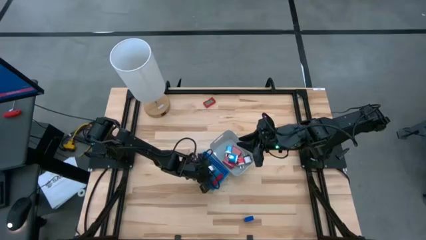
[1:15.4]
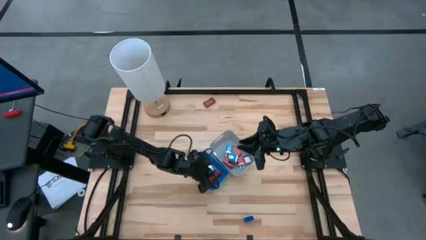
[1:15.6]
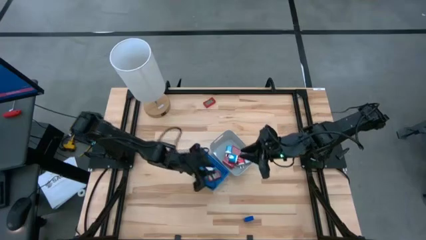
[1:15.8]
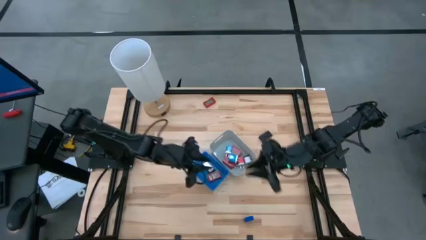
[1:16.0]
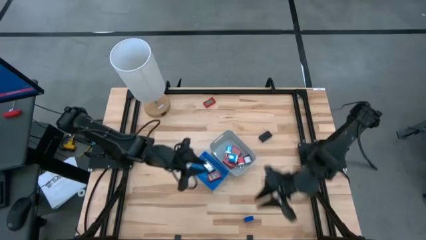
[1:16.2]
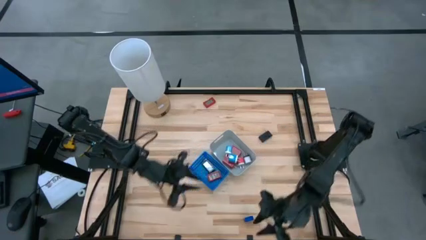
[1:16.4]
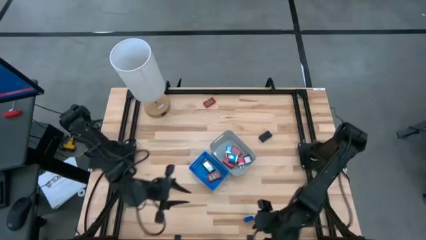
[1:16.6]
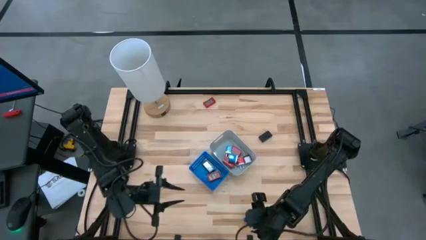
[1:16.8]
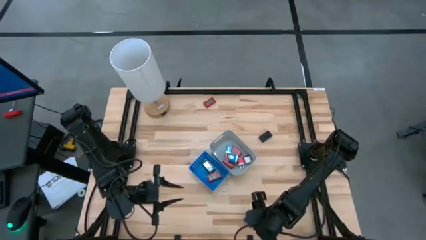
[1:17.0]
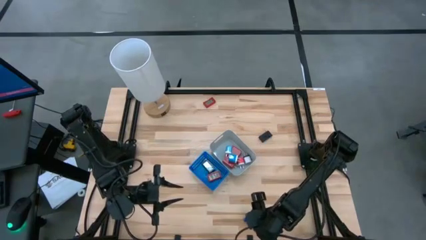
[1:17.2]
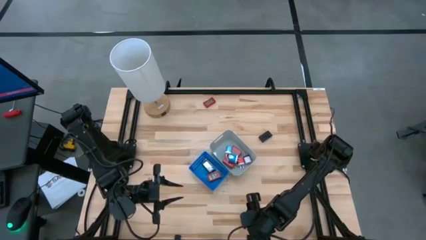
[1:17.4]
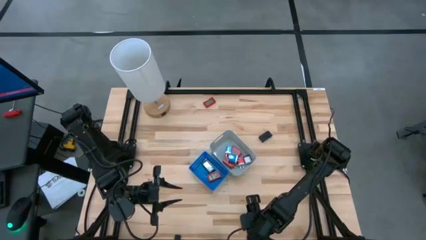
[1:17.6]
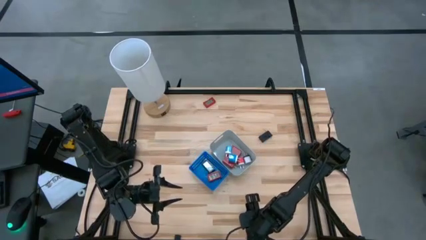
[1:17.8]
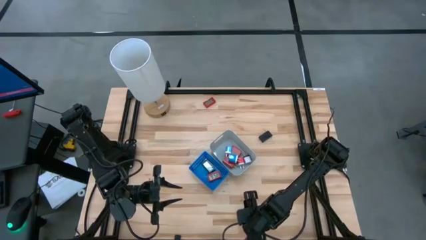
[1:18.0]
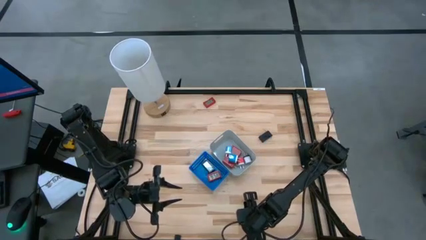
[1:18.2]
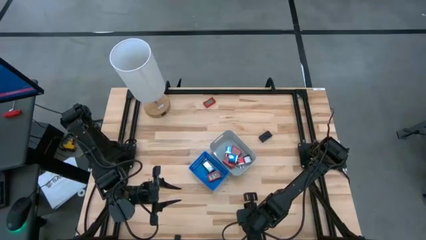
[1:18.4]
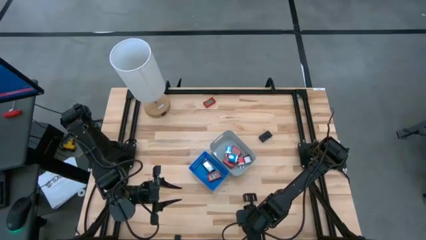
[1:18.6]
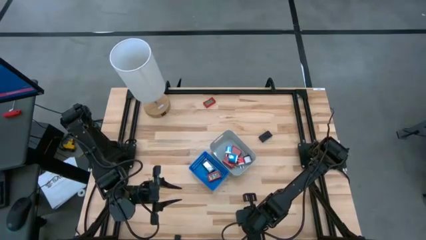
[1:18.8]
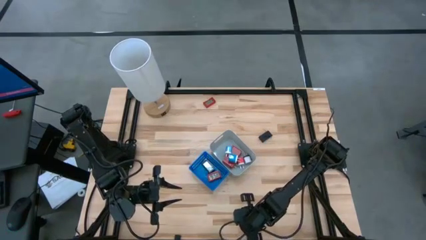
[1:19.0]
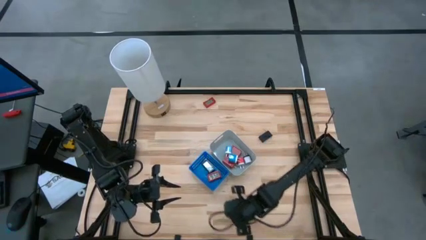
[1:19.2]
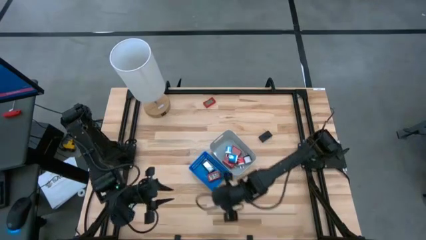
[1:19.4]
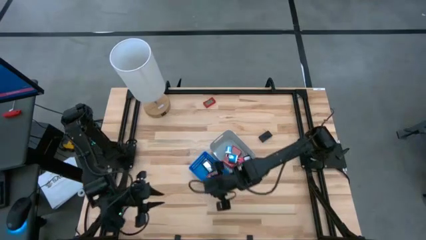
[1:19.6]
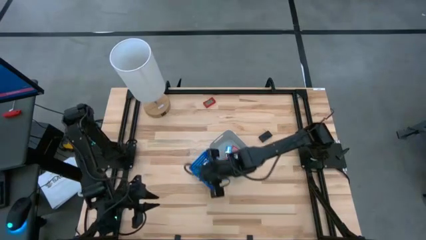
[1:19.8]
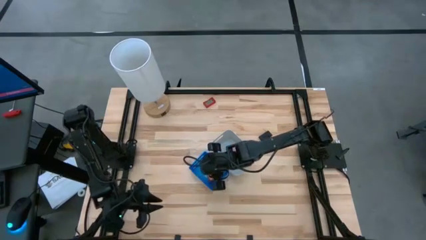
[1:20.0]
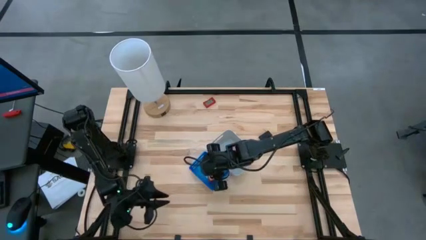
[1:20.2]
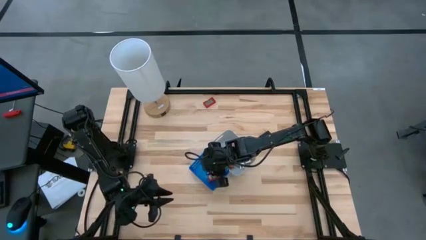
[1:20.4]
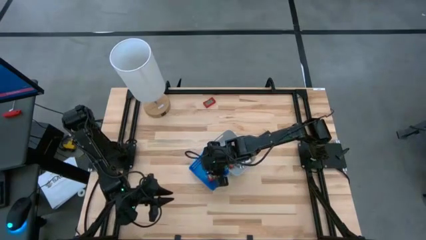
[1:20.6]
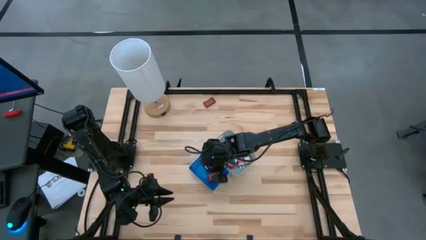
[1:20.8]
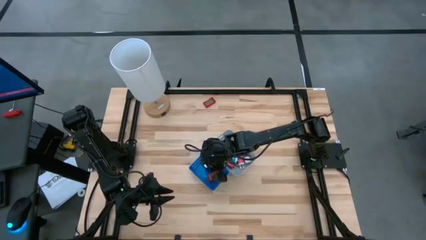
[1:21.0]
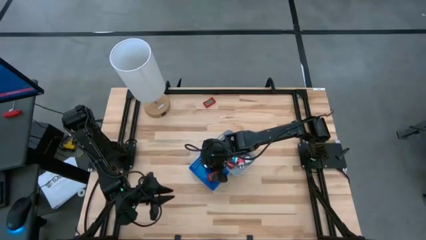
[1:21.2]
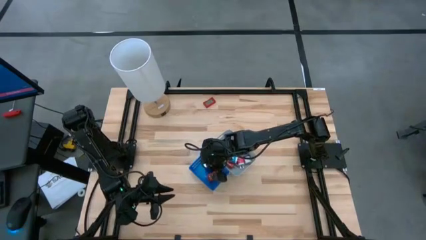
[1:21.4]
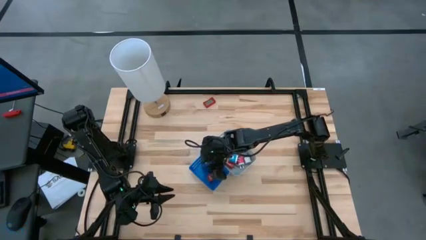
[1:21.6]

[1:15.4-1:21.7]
Task: Pick & Place Office items
Put the blue digital timer into the blue bin

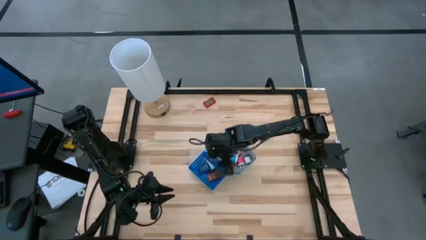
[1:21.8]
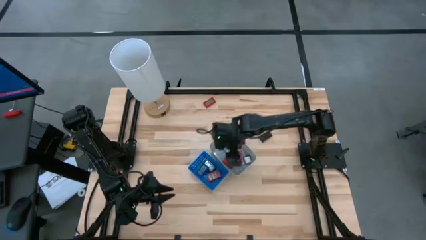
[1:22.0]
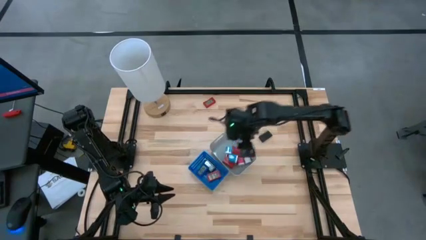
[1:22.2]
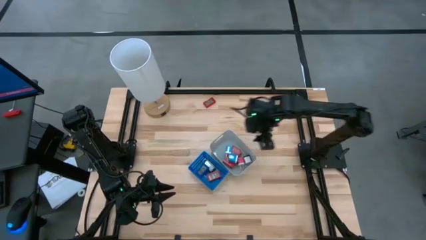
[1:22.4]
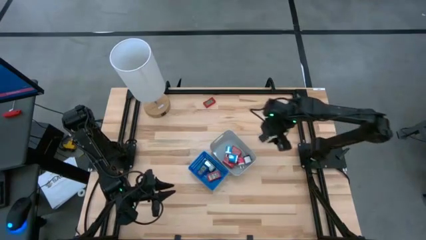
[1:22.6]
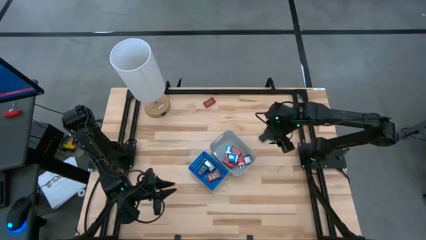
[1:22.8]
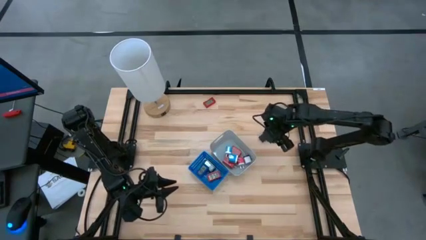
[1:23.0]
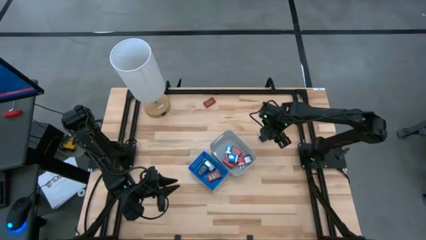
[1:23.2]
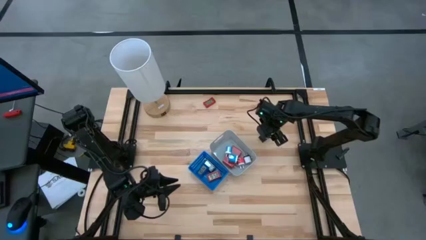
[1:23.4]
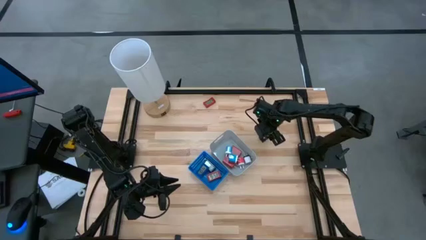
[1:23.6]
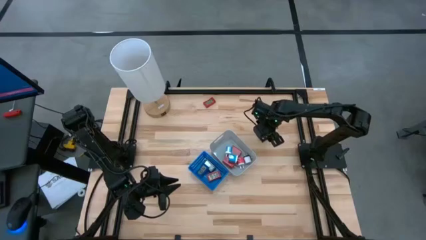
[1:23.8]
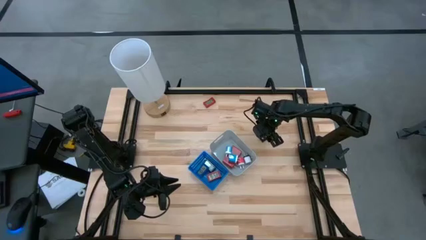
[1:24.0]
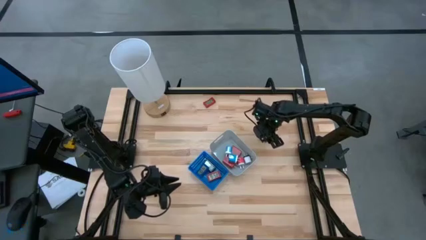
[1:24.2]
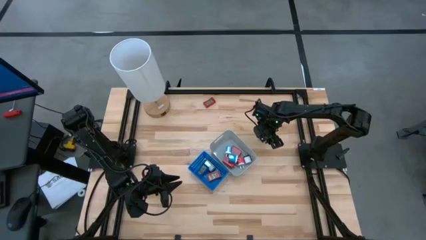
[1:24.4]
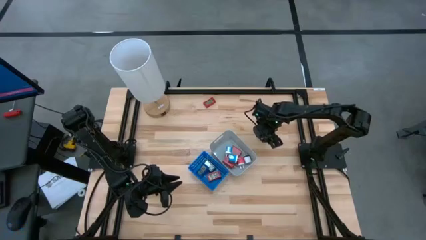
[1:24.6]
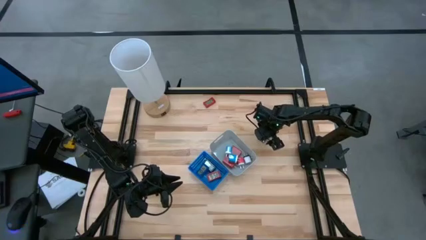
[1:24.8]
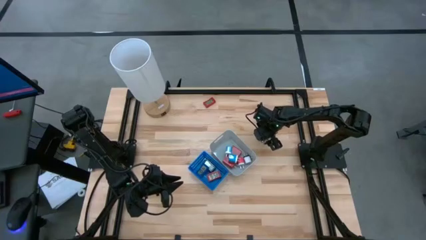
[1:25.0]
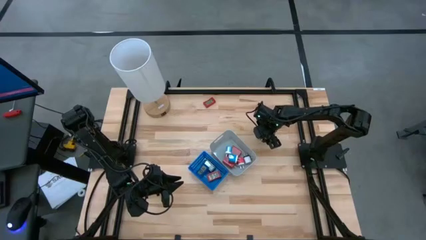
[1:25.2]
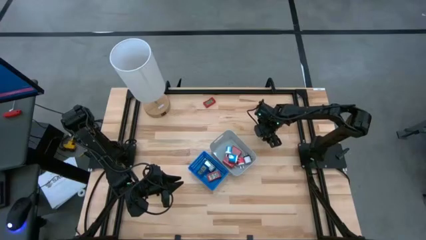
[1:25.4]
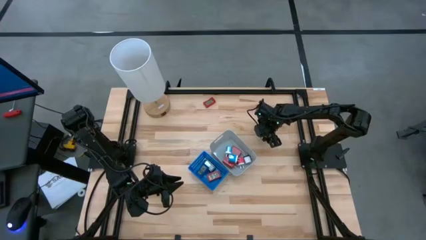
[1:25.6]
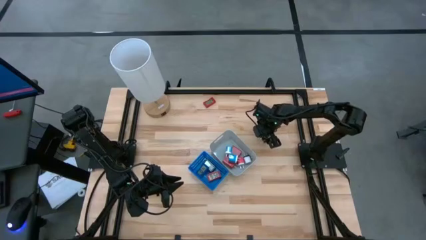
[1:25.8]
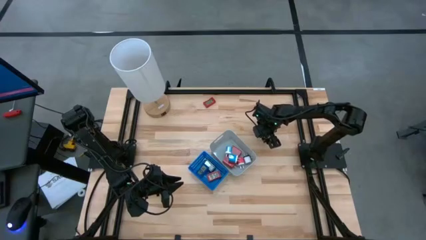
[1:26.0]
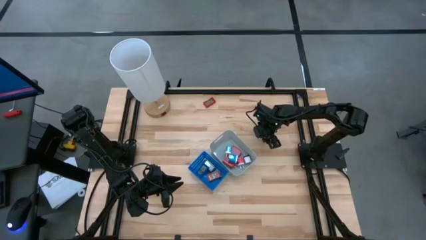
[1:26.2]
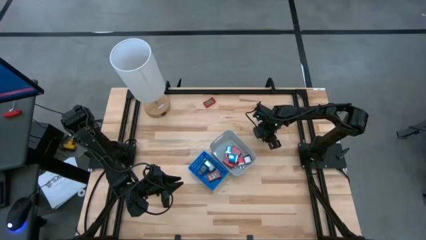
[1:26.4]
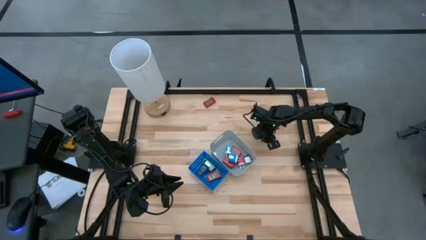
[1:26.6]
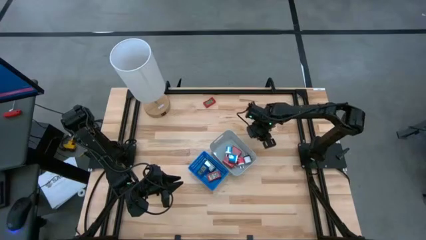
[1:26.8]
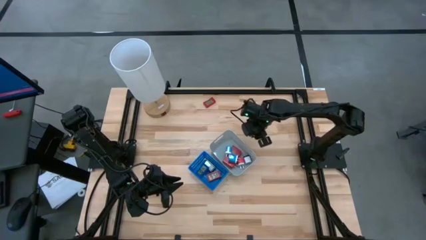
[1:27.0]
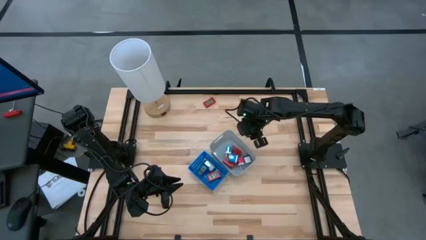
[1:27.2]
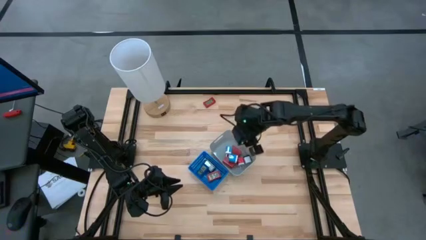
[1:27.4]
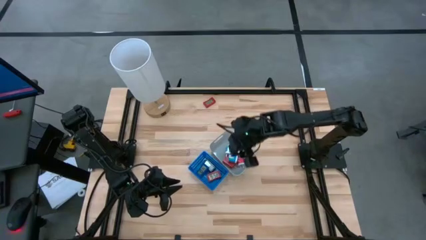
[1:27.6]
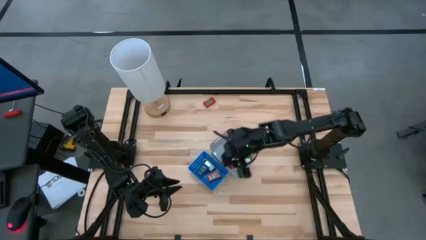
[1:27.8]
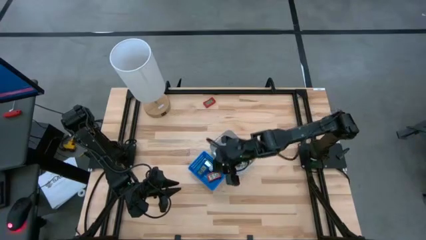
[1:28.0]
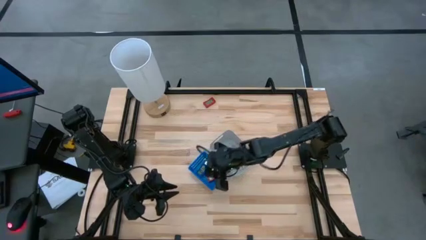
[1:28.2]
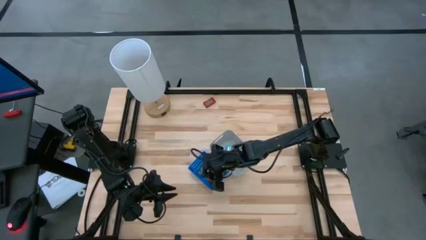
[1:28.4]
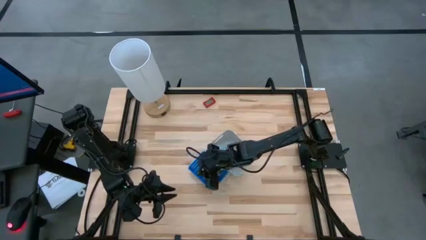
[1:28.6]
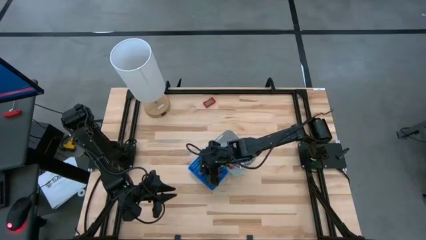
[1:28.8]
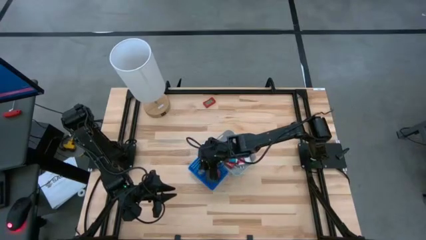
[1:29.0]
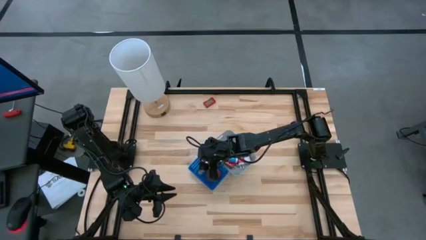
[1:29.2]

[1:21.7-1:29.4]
Put the black digital timer into the blue bin
